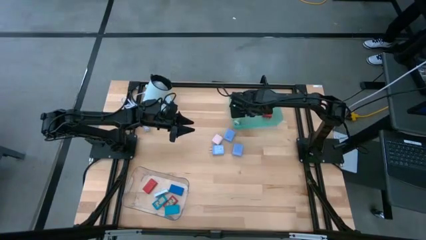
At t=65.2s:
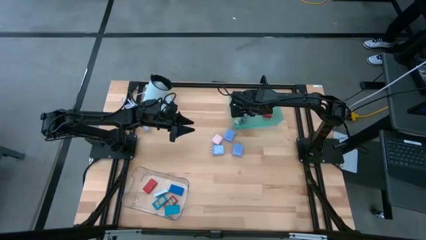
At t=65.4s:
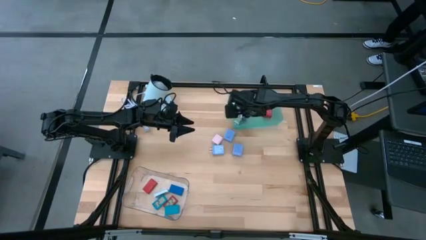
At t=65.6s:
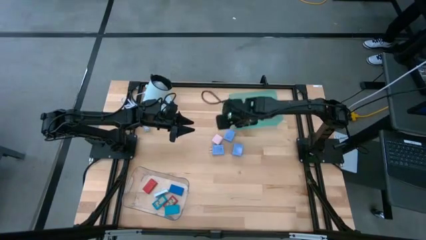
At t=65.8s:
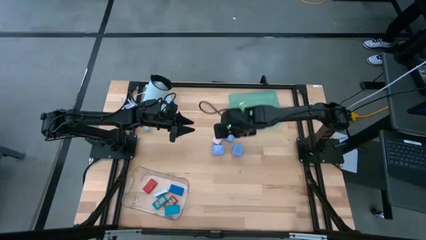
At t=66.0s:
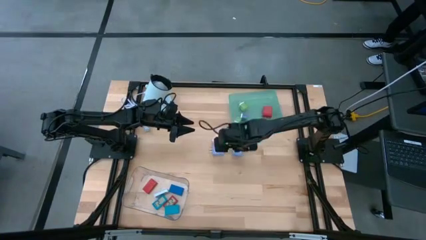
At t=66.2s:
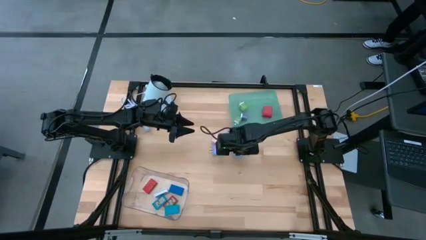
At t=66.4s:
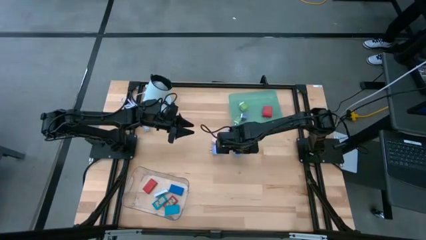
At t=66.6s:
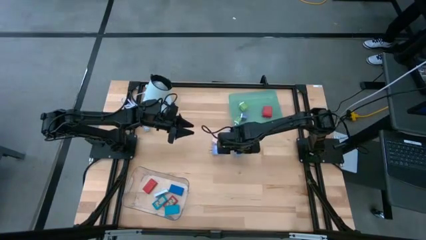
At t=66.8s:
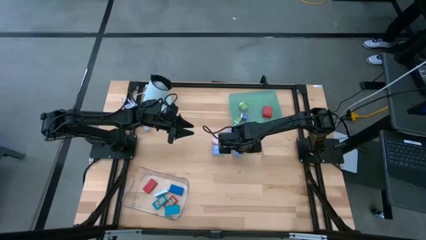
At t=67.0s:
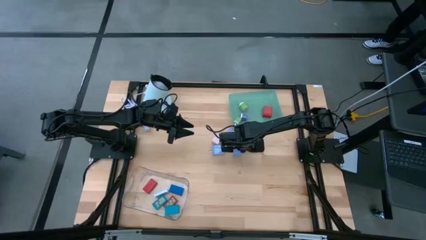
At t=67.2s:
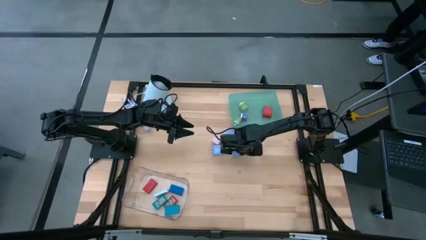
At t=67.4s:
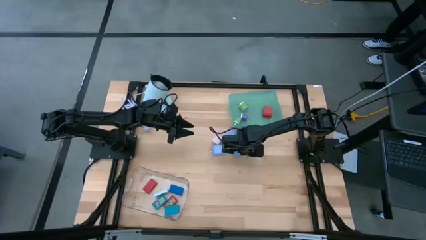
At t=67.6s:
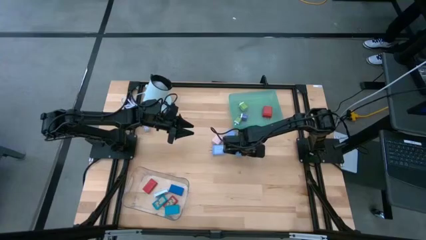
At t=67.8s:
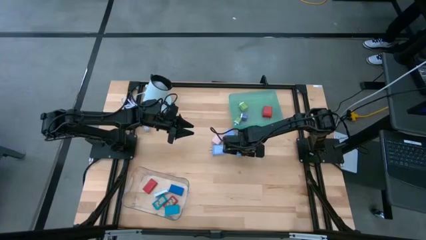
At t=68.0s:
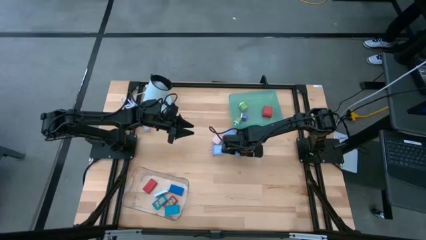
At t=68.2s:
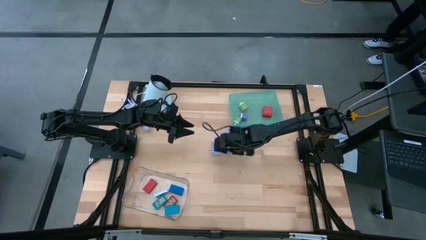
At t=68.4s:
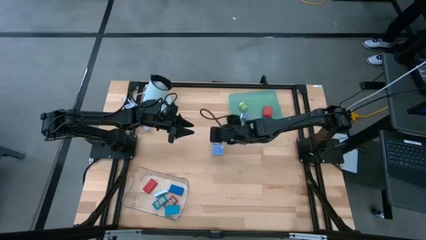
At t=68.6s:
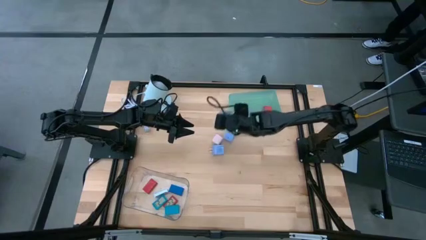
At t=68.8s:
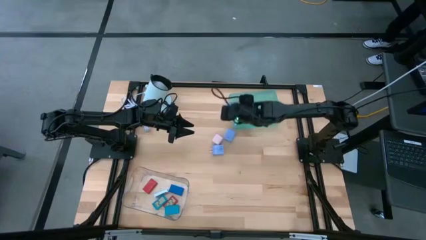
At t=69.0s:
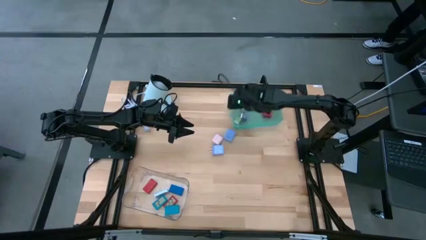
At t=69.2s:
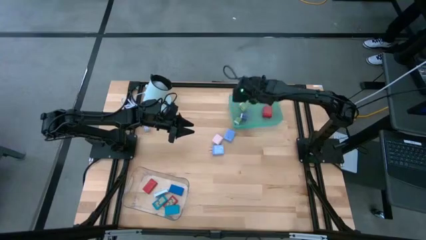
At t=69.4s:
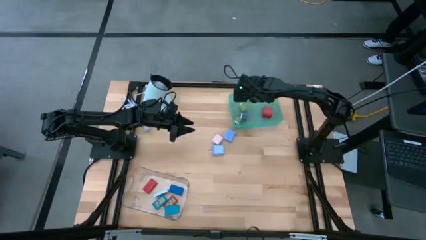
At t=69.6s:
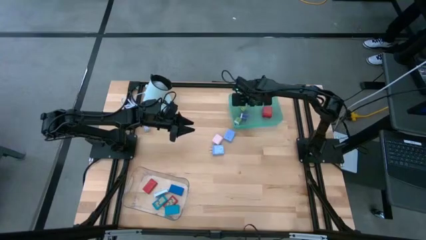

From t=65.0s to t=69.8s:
Task: Pick & Place Office items
Put the light blue charger adapter into the light green bin

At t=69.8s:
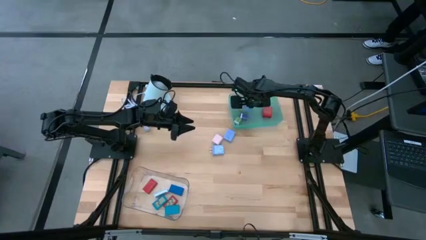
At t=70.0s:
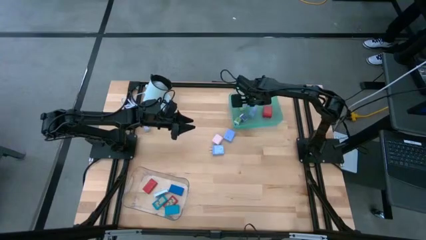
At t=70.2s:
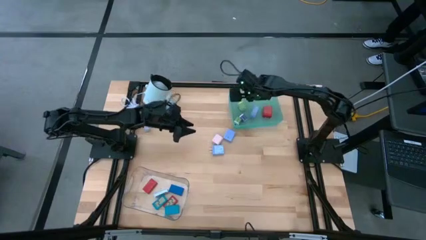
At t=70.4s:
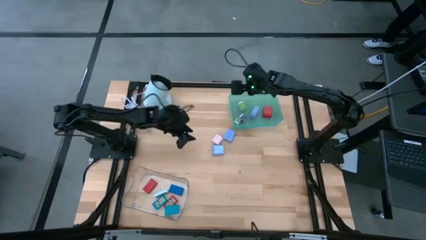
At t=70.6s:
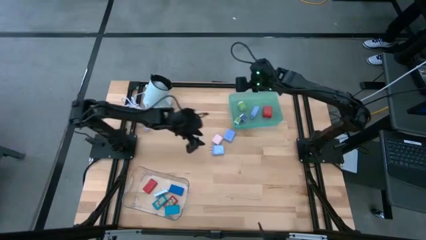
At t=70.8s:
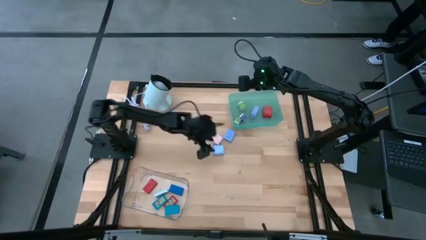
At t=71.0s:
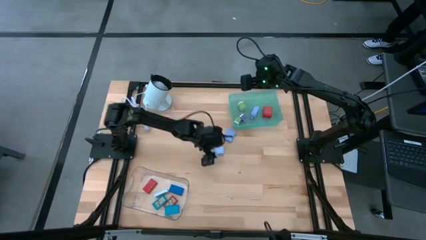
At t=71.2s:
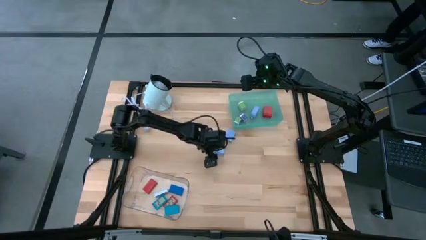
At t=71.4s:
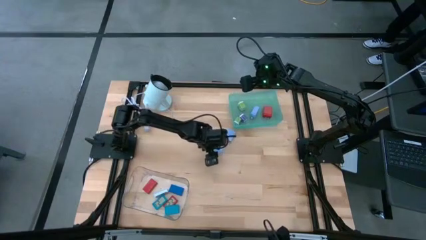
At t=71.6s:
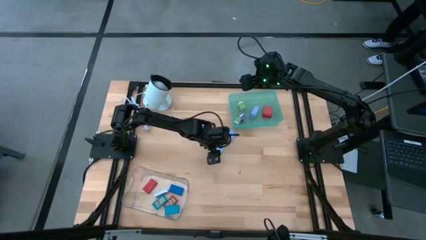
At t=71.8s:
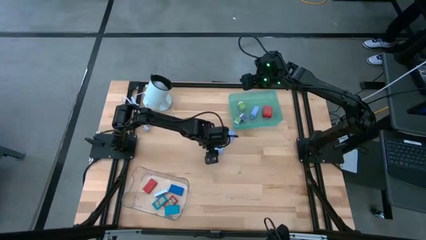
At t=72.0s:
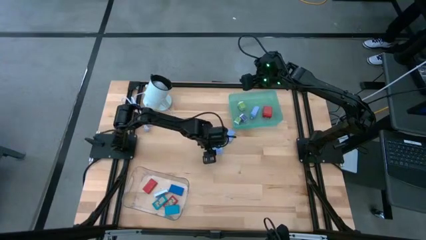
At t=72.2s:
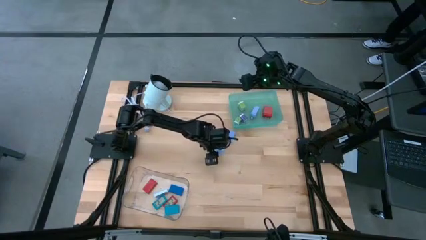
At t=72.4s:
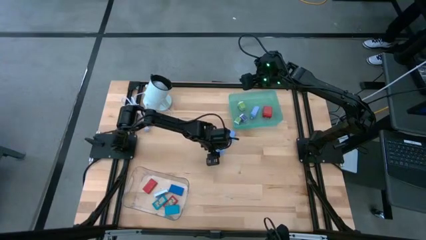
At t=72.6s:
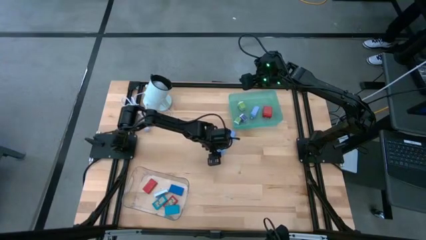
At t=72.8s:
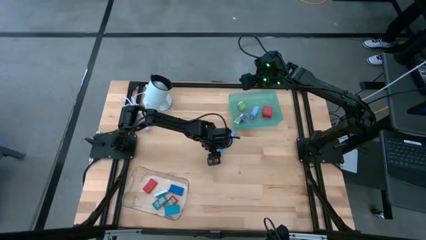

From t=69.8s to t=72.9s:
Put the light blue charger adapter into the light green bin

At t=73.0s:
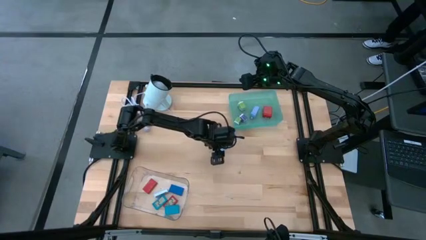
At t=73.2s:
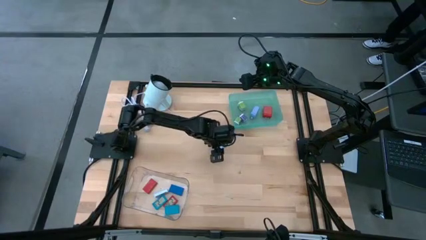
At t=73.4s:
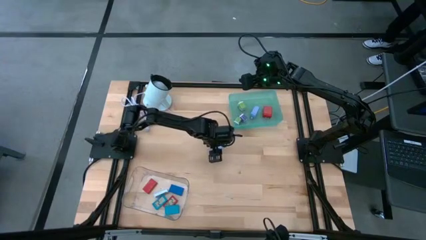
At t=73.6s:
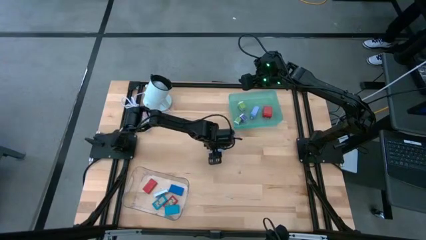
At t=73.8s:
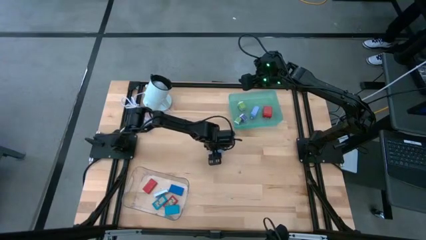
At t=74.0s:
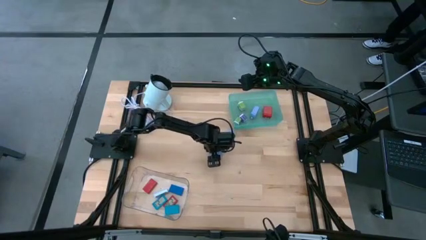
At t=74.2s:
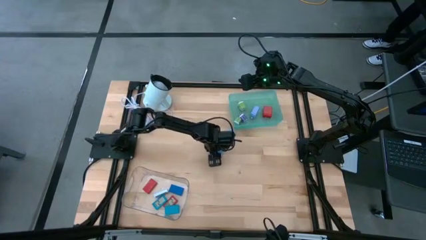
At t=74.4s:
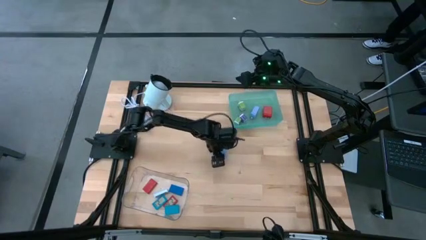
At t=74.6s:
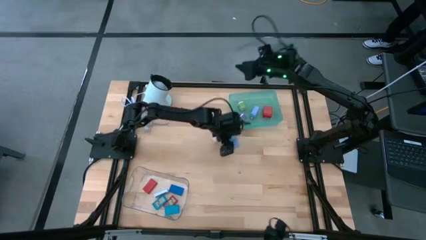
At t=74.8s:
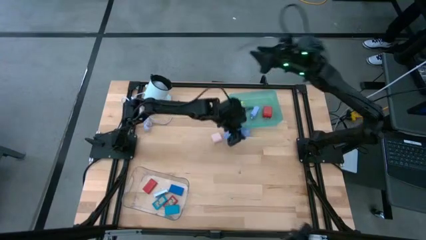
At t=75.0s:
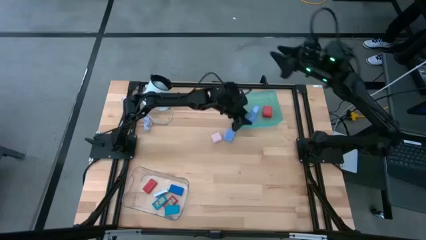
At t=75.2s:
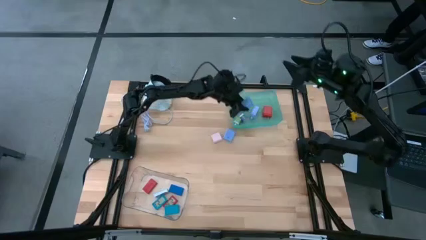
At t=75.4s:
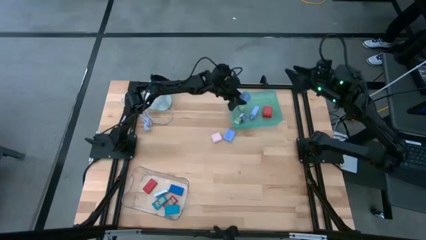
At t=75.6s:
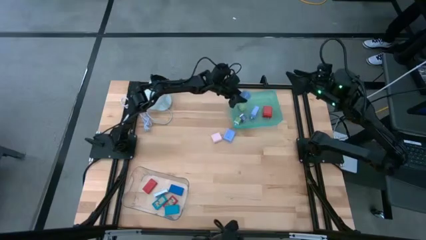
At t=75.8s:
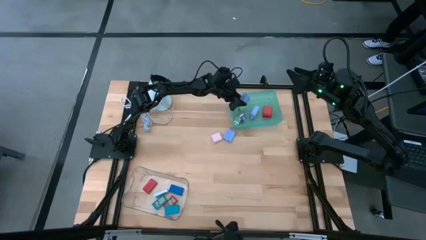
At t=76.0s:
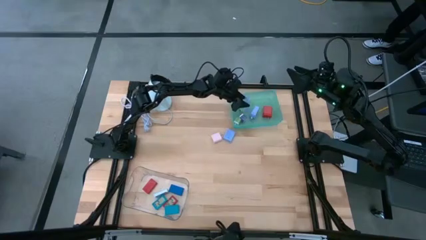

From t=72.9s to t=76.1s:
Put the light blue charger adapter into the light green bin

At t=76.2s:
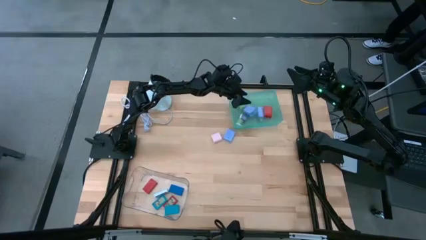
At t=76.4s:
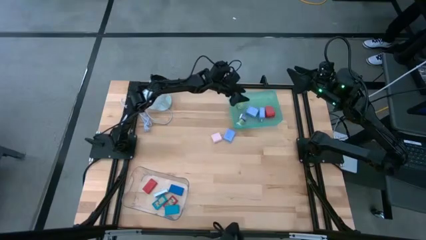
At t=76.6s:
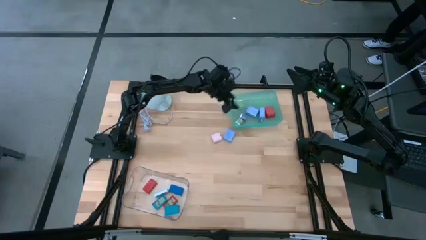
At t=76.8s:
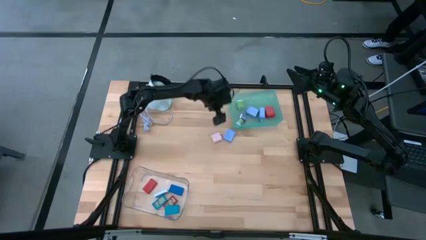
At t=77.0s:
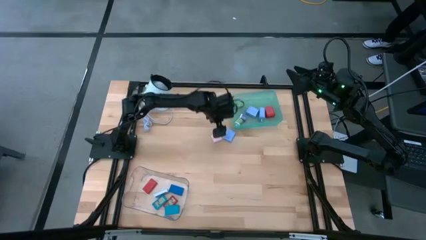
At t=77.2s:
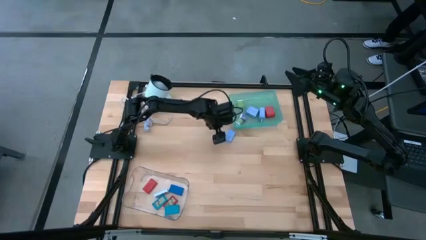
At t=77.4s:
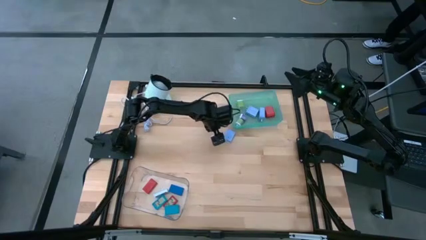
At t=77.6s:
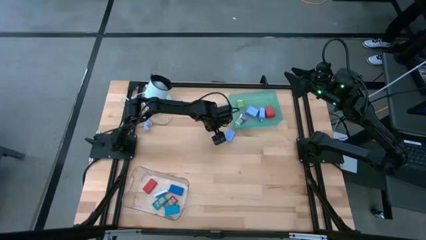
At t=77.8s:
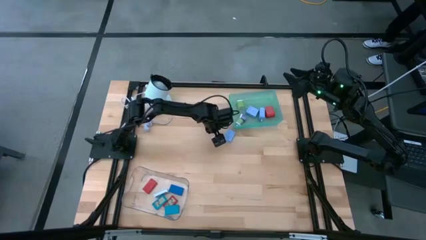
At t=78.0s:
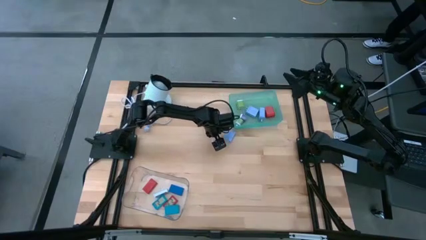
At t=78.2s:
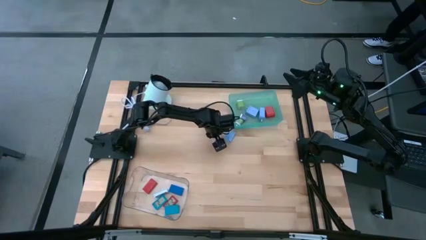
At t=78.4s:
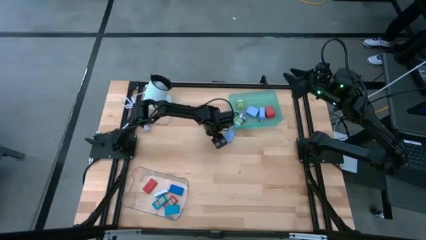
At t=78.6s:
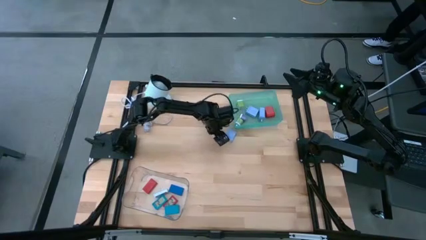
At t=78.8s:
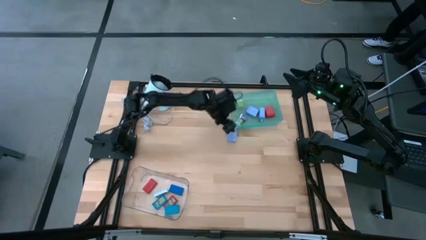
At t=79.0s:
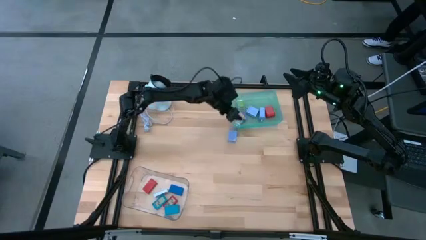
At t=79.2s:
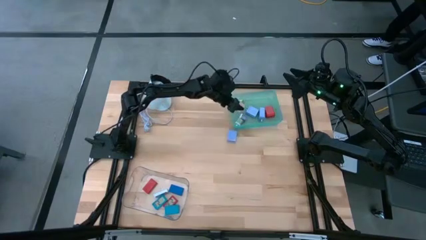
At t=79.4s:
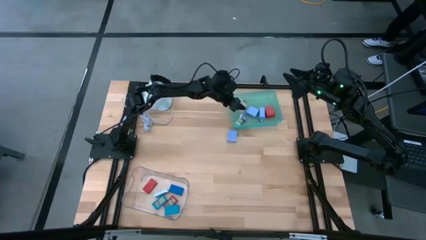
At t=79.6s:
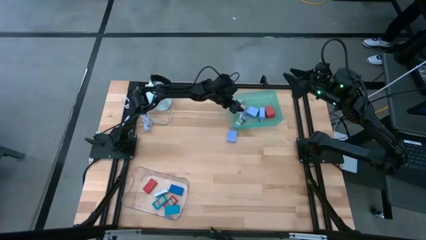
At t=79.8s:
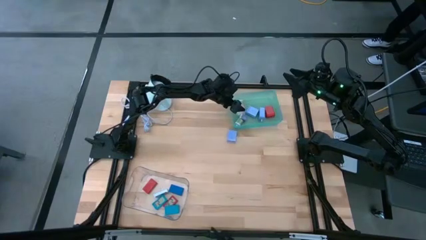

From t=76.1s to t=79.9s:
Put the pink charger adapter into the light green bin

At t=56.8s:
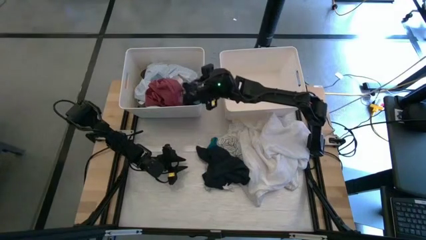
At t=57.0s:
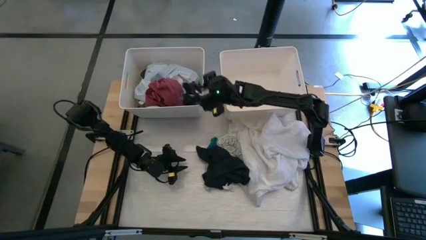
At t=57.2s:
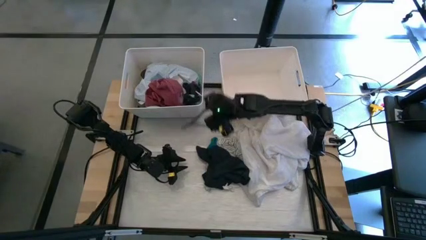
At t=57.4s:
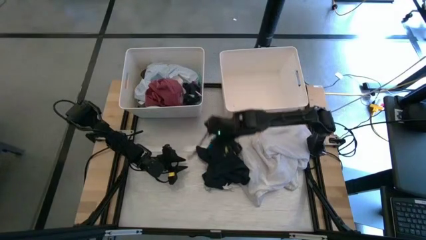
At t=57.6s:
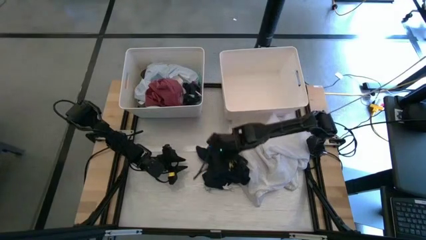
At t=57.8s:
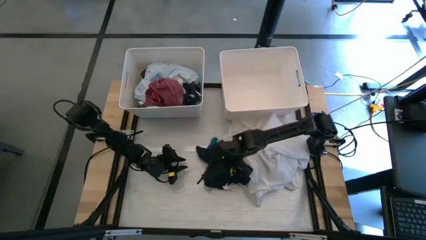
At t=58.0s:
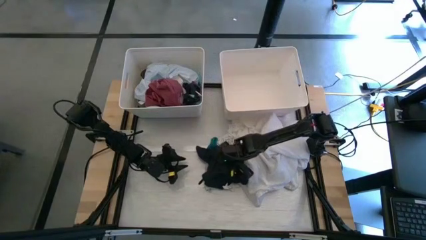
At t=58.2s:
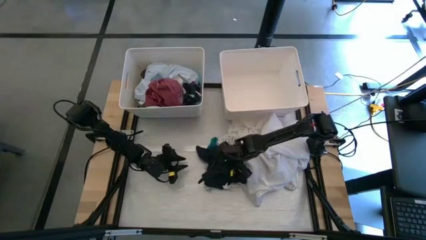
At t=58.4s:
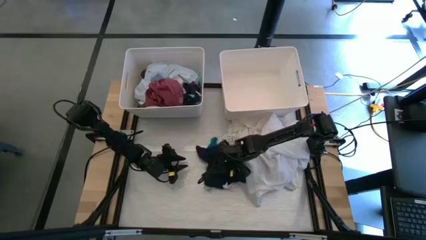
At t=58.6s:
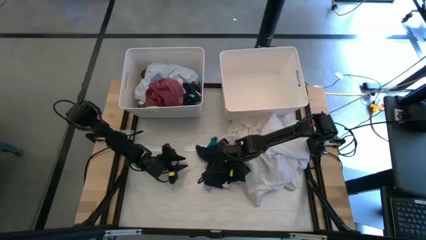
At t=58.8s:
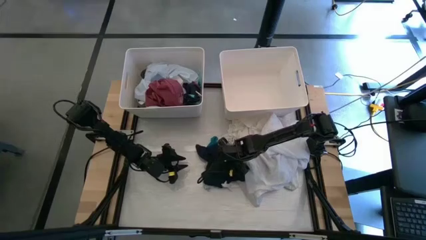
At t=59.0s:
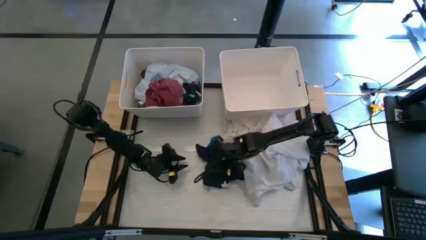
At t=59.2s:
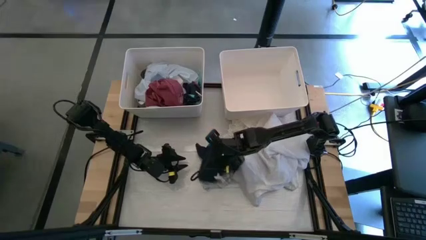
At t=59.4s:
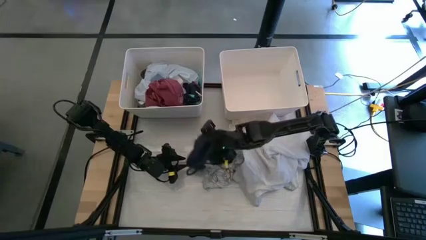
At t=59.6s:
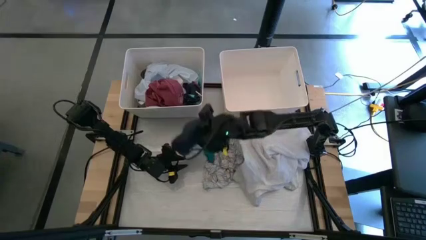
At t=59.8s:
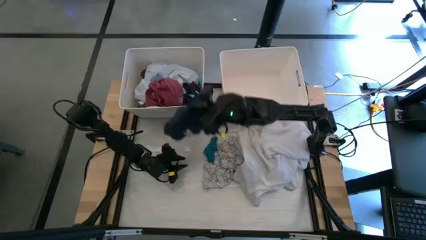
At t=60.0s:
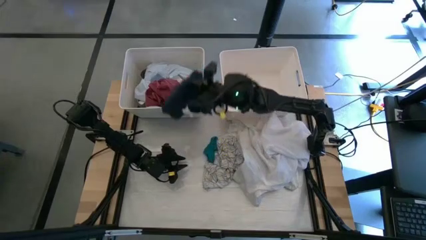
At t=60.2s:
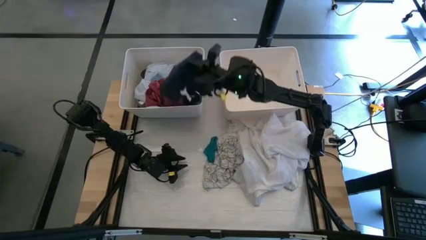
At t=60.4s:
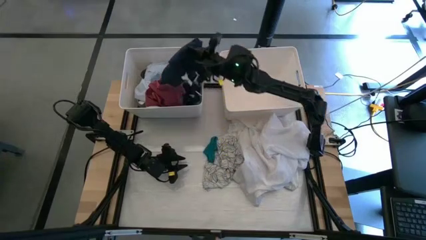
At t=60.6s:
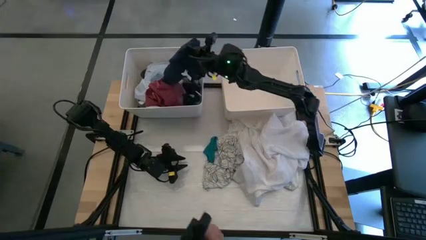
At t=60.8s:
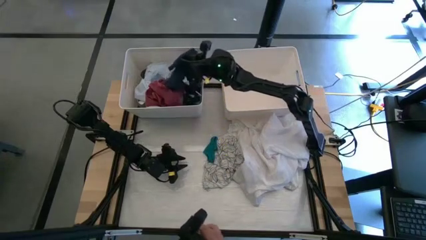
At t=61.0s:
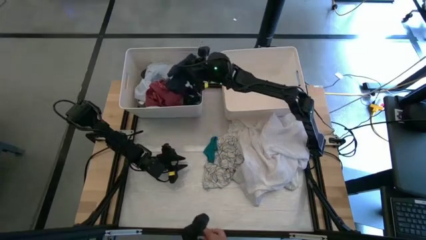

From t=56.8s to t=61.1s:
Task: Sort clothes
Put the black shorts into the left white laundry bin
